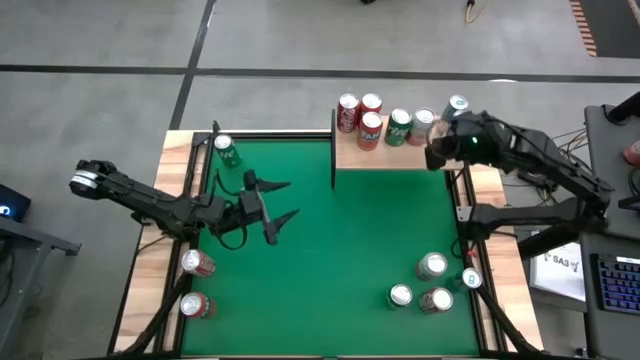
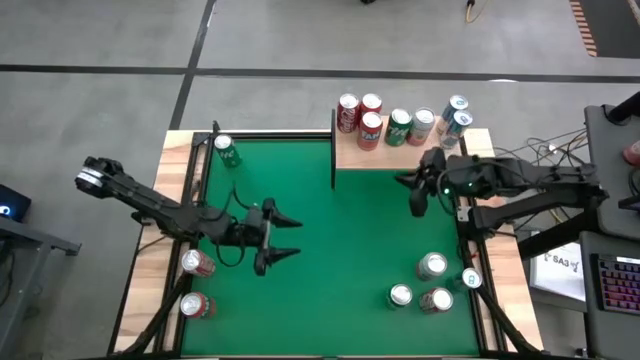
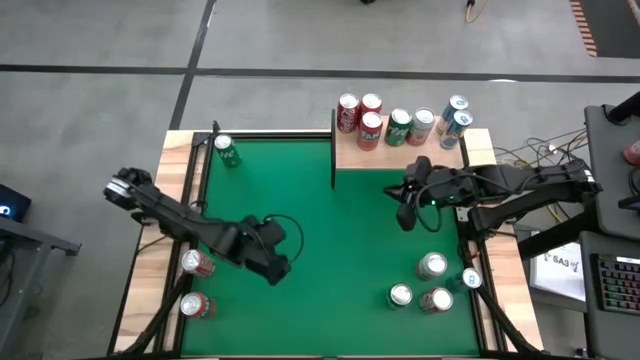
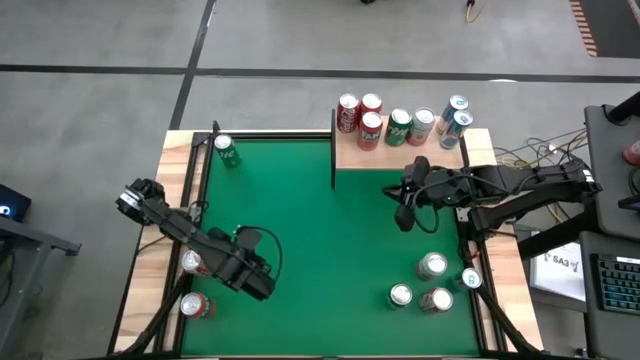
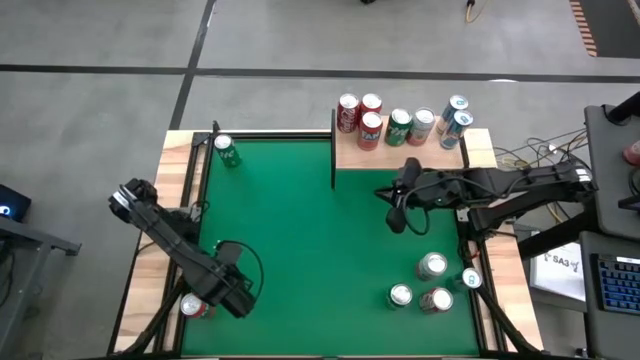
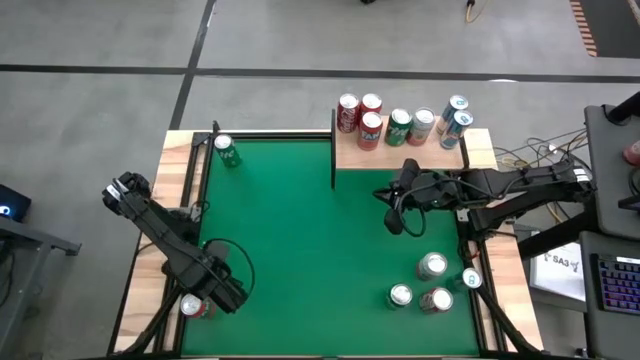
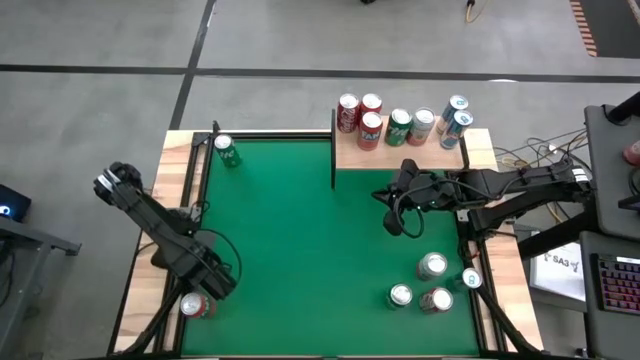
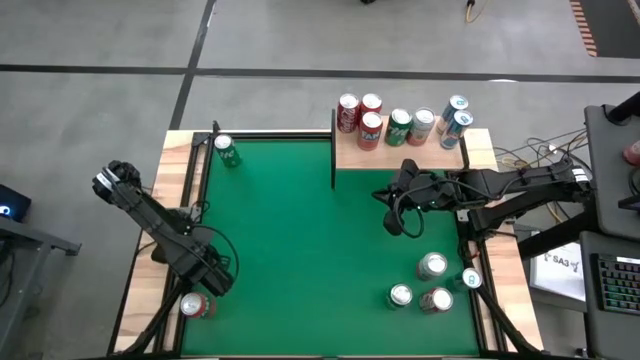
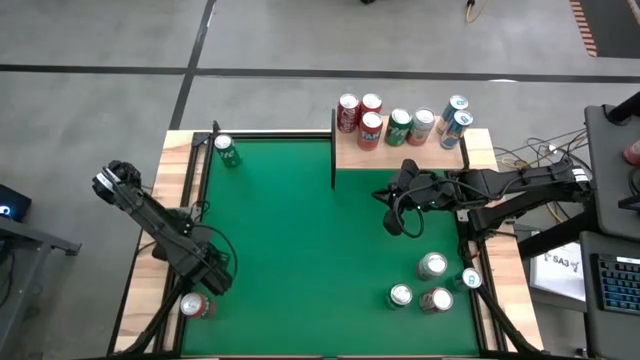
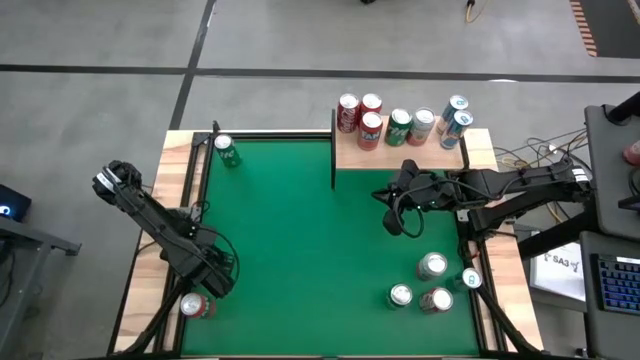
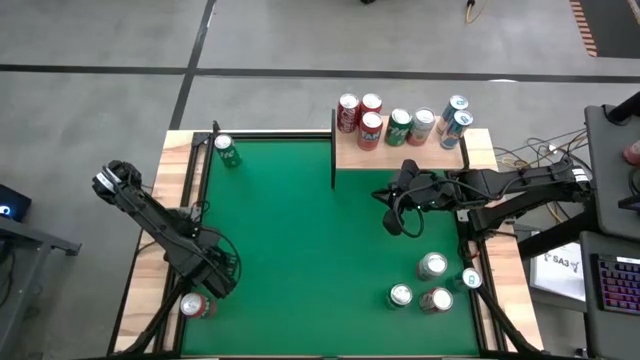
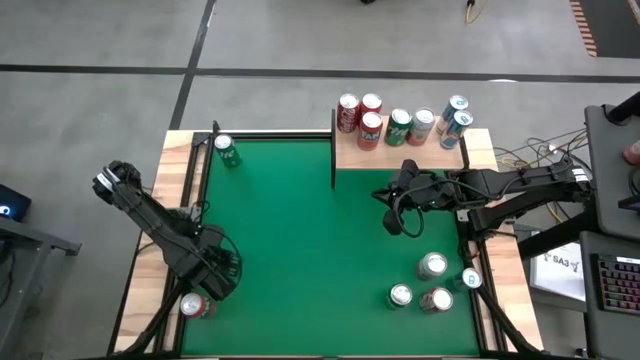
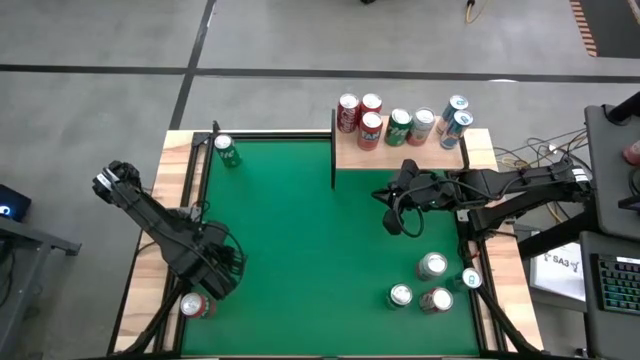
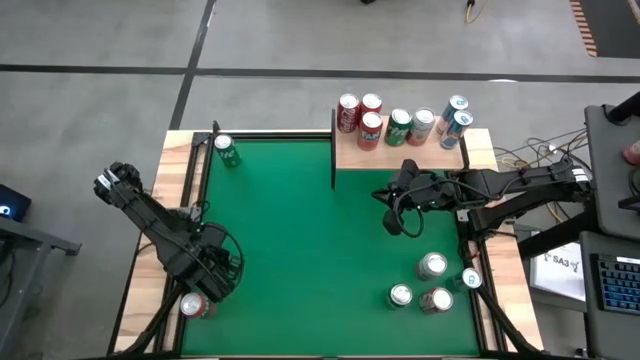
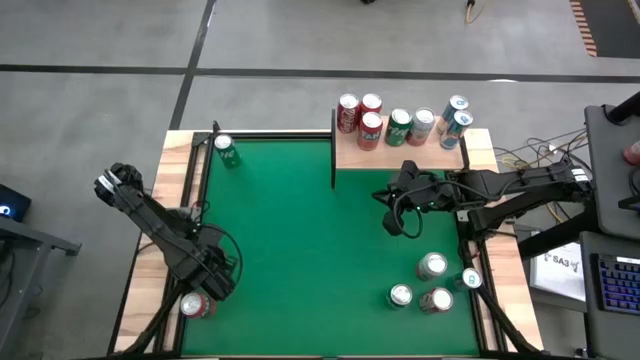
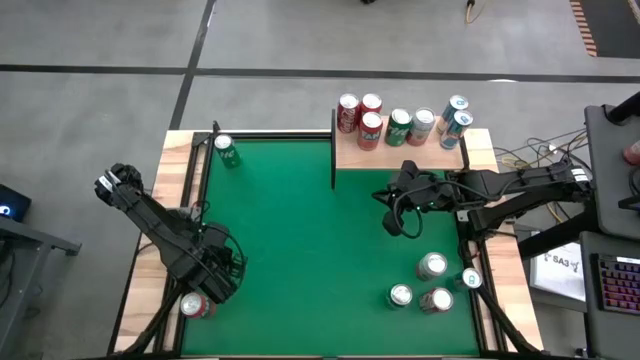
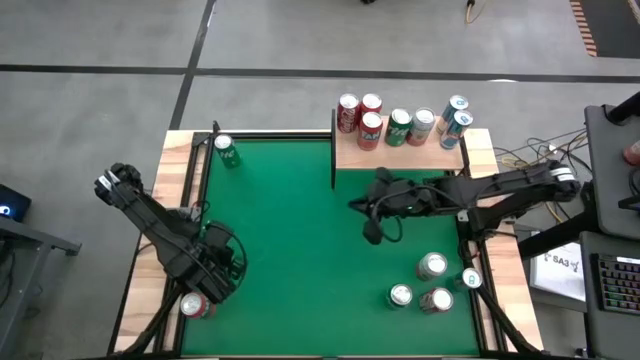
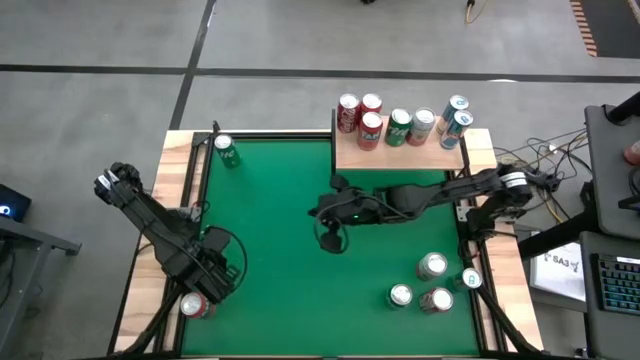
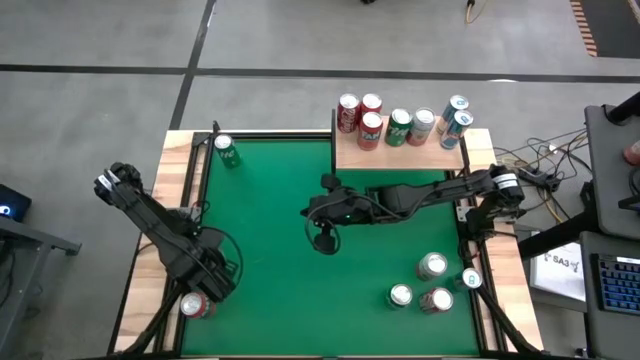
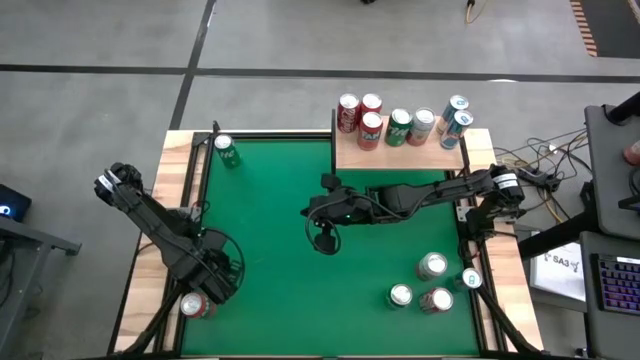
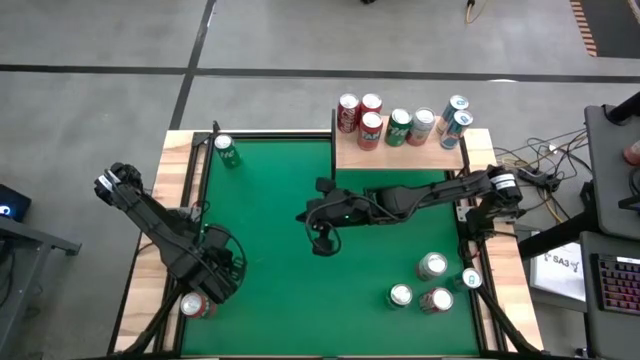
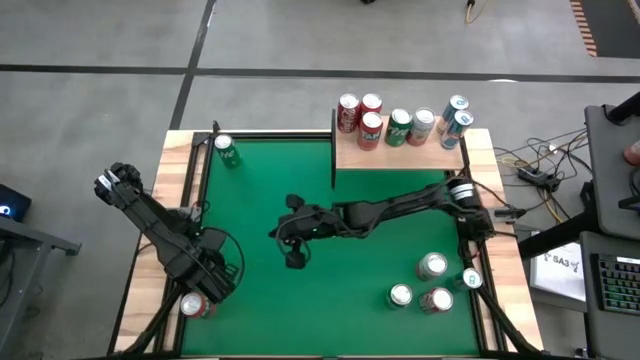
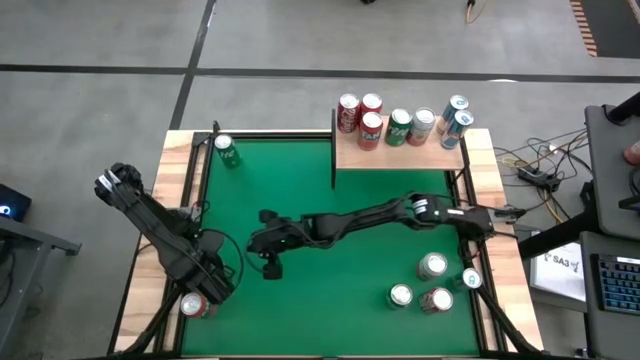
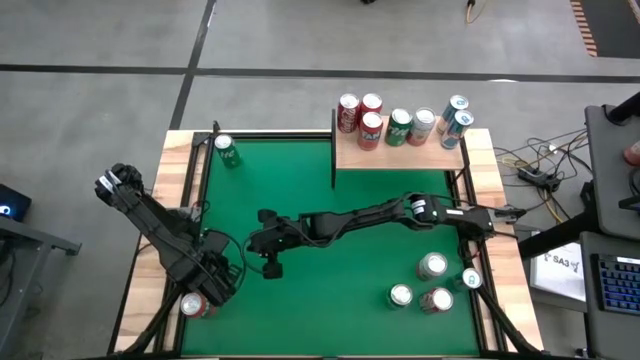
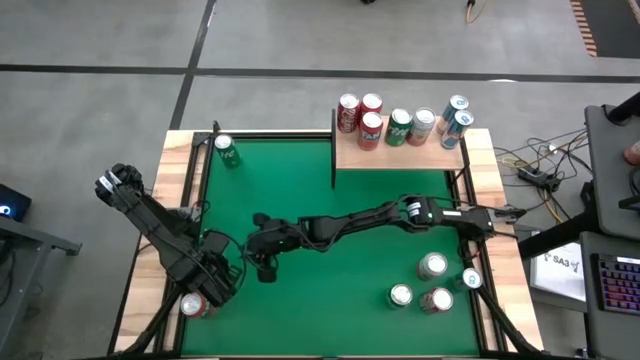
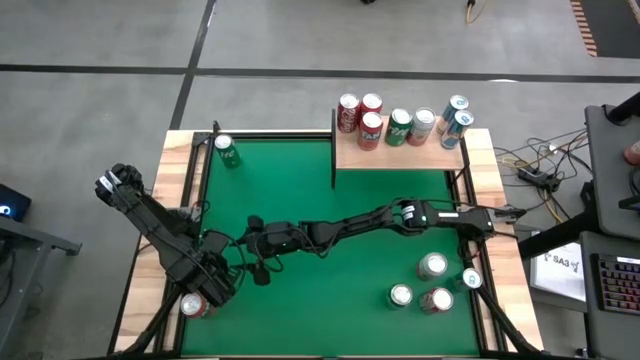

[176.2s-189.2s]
Task: Place canned beverage on shelf
Put the left red-white soda can on the shelf aligned with the other red-white soda can

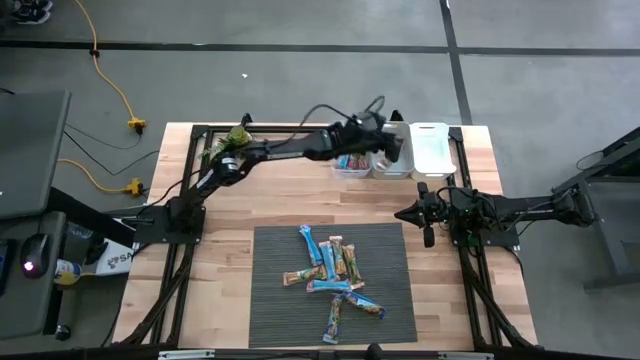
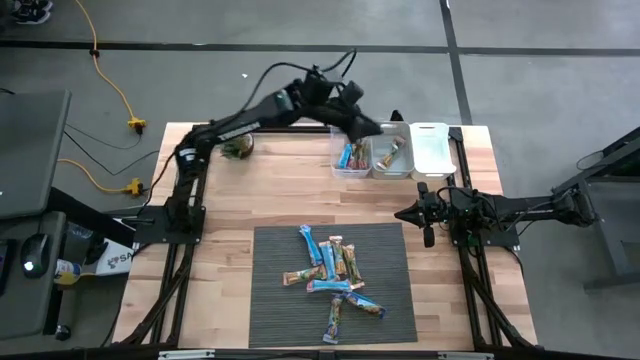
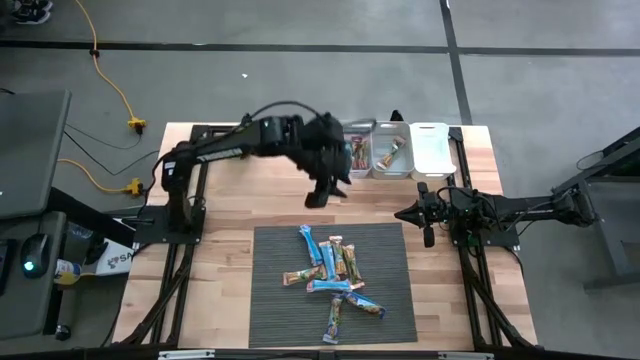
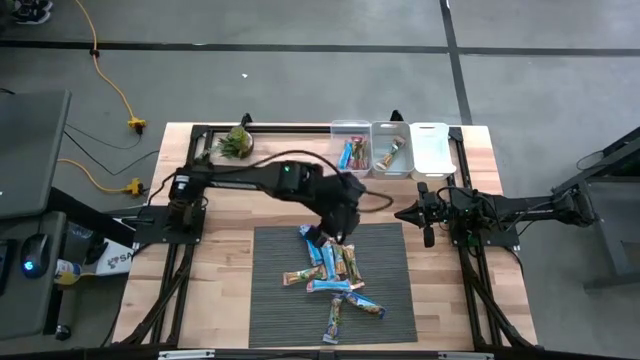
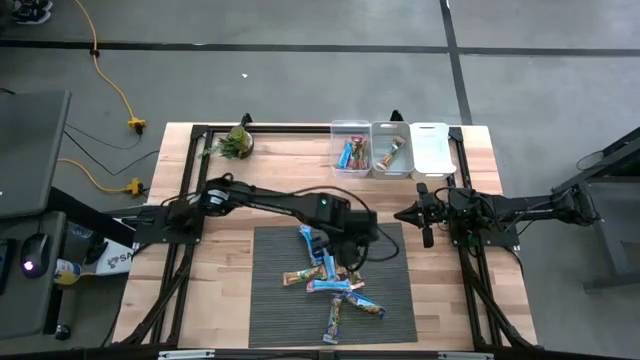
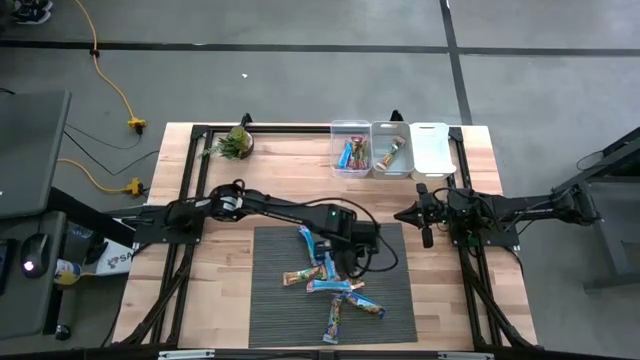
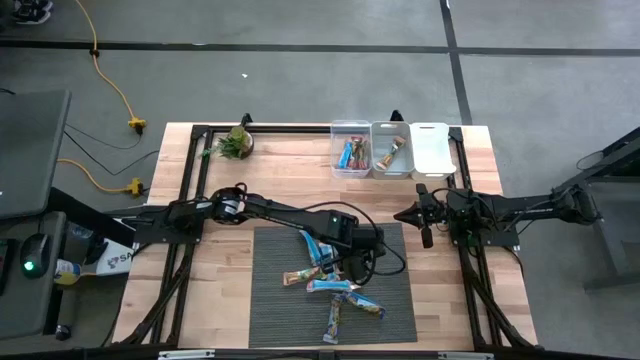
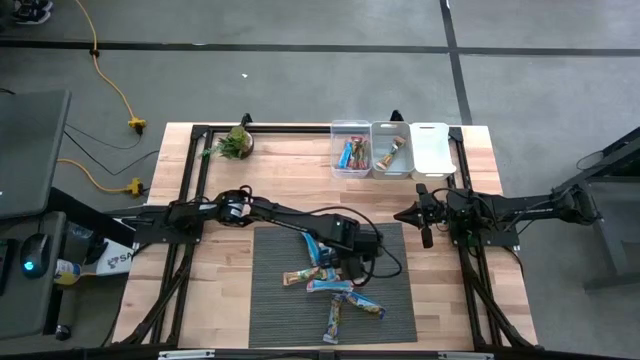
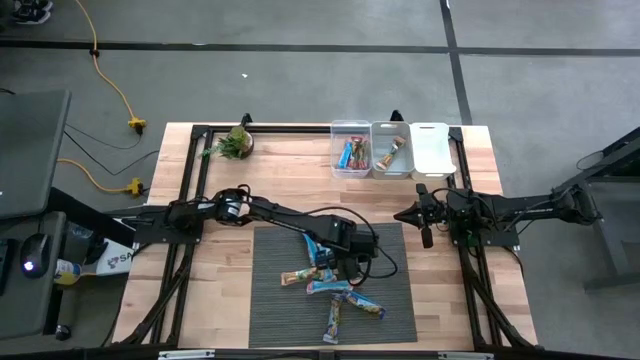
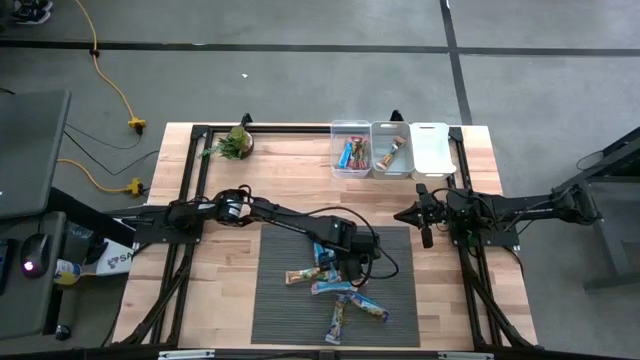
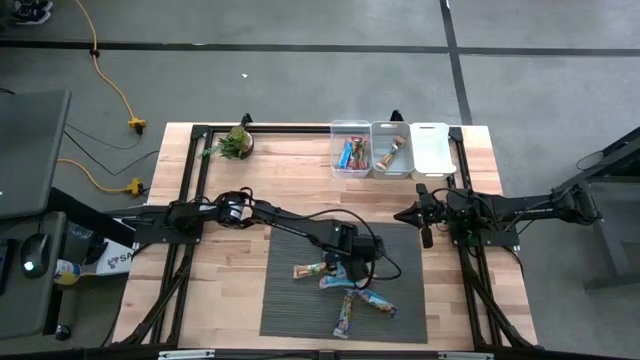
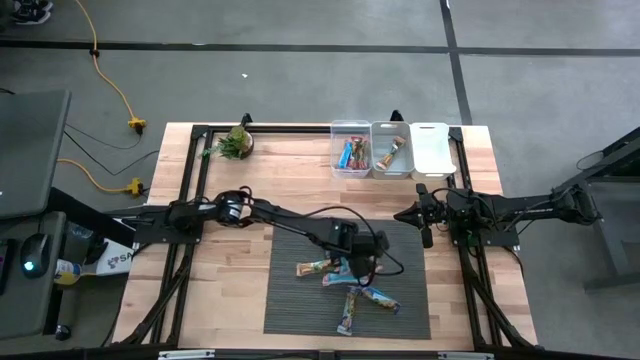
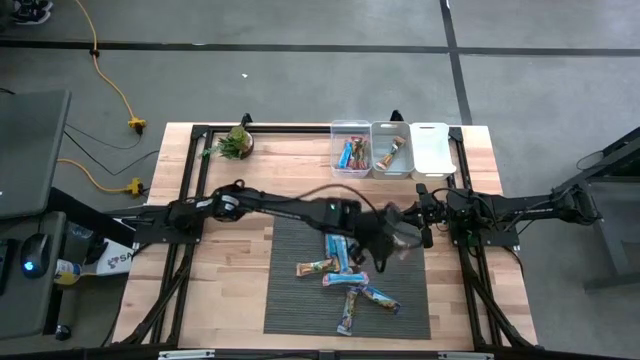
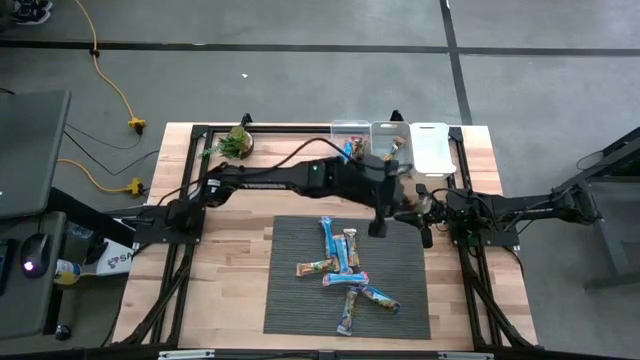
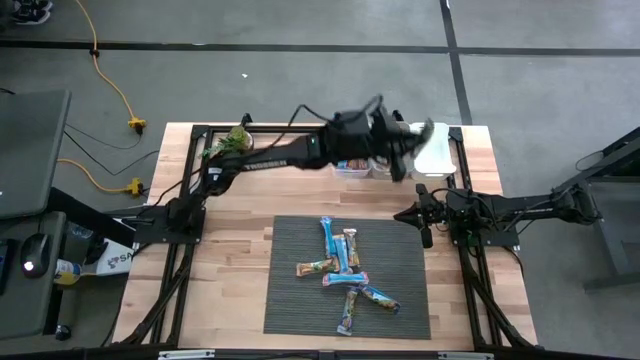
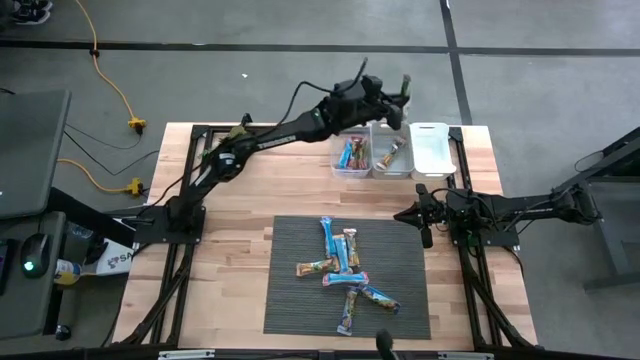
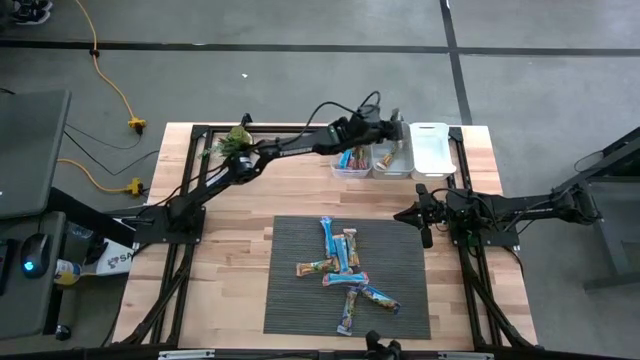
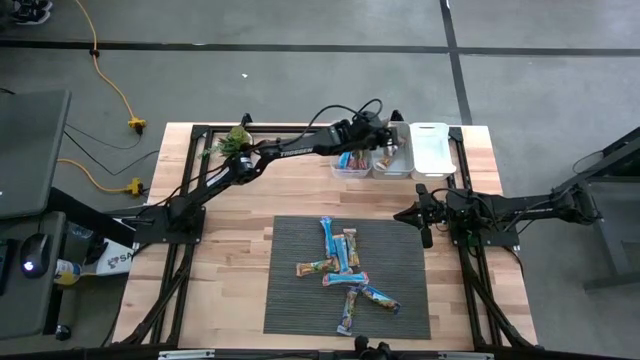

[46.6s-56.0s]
Task: Pick and place Granola Bars by type
Put the orange granola bar into the gray bin
